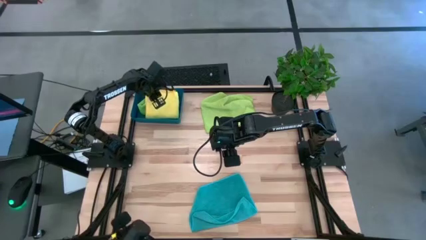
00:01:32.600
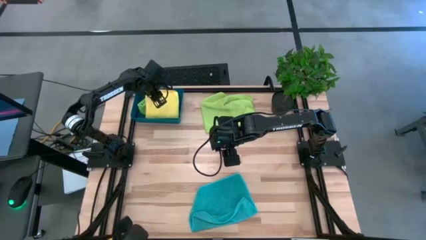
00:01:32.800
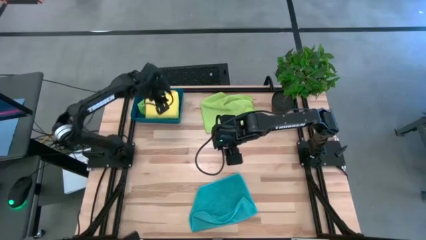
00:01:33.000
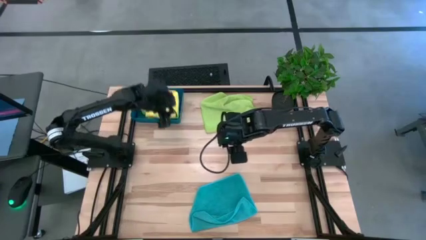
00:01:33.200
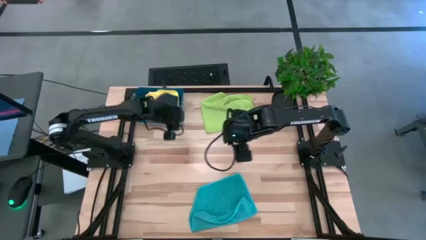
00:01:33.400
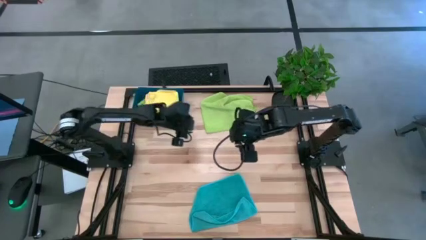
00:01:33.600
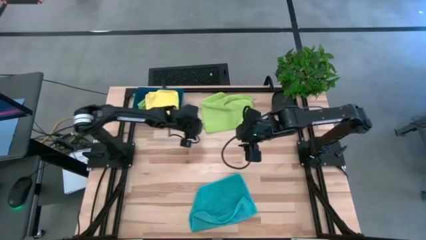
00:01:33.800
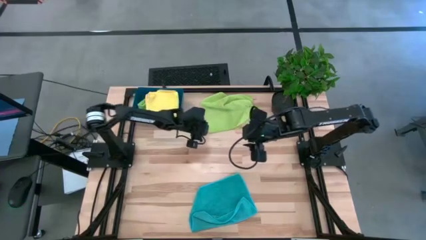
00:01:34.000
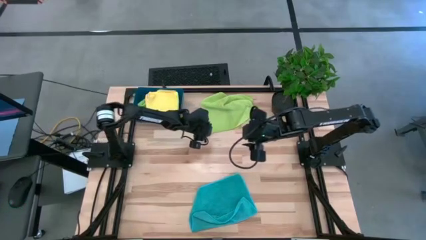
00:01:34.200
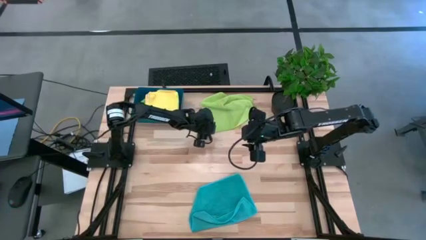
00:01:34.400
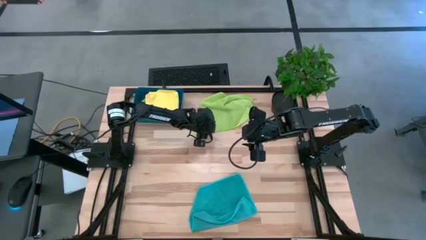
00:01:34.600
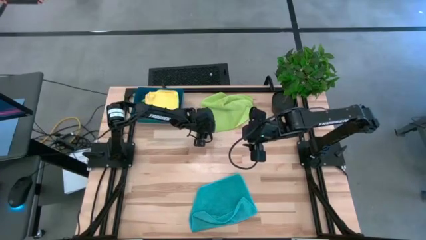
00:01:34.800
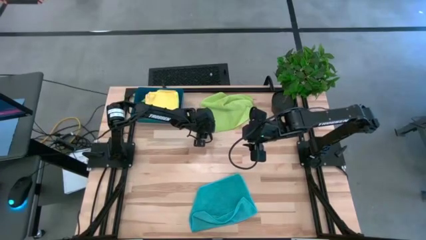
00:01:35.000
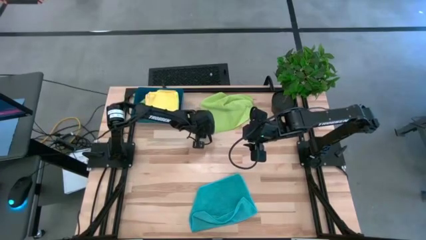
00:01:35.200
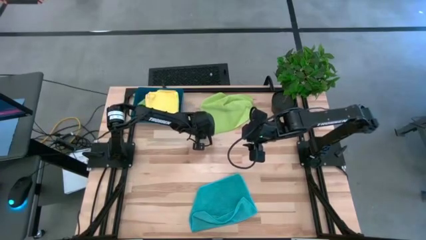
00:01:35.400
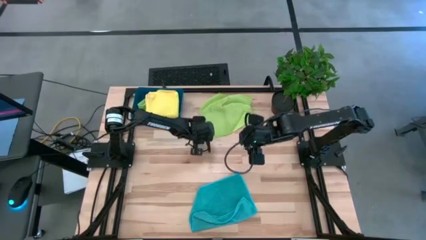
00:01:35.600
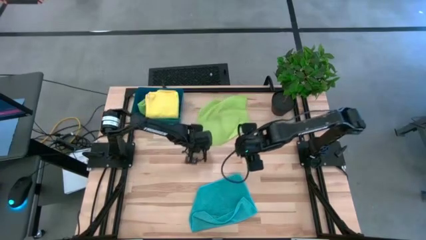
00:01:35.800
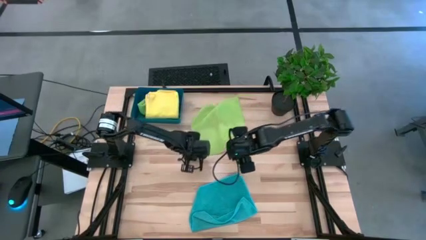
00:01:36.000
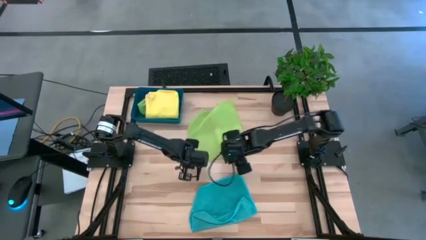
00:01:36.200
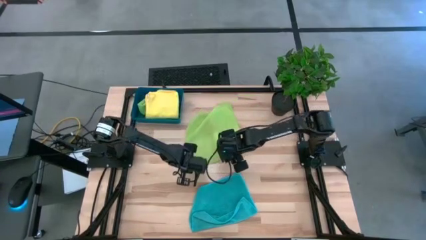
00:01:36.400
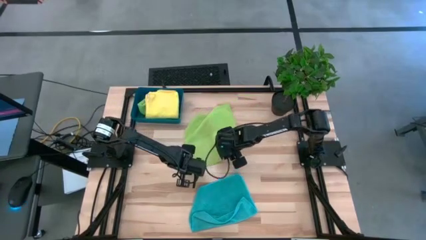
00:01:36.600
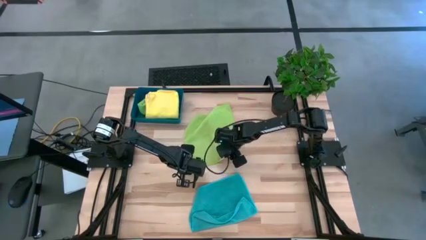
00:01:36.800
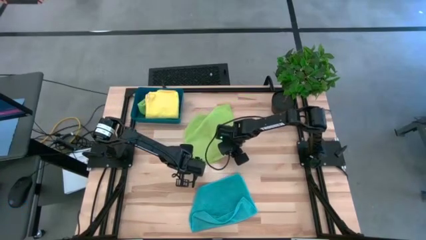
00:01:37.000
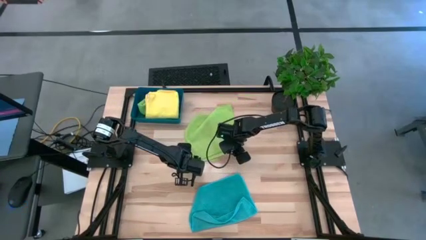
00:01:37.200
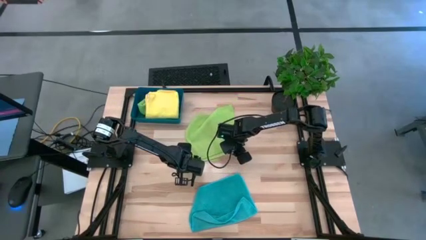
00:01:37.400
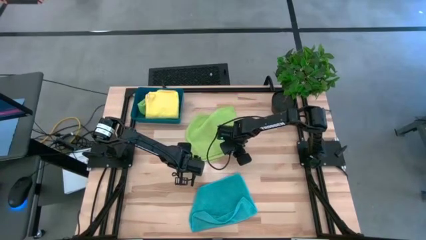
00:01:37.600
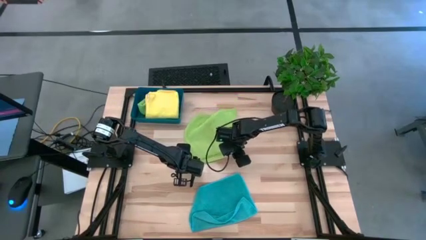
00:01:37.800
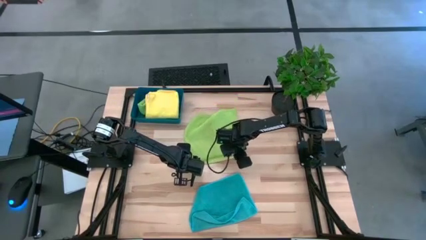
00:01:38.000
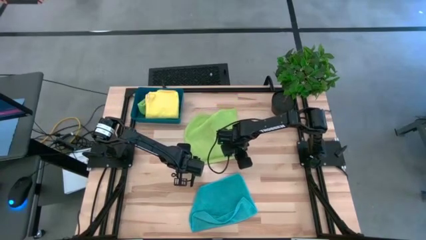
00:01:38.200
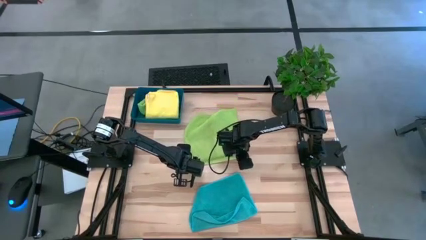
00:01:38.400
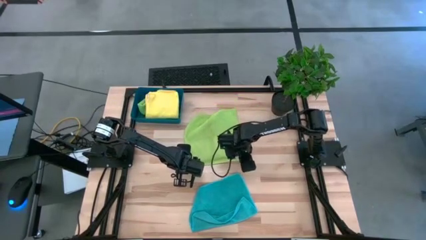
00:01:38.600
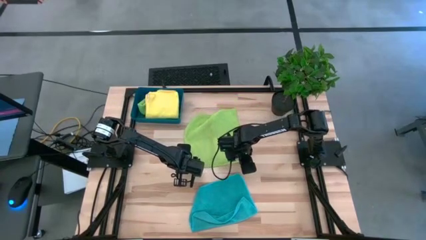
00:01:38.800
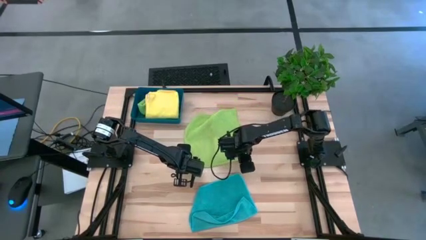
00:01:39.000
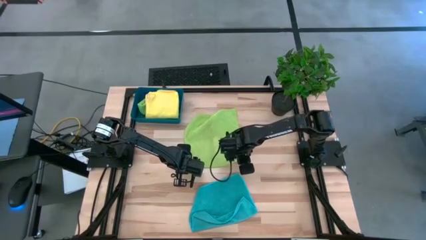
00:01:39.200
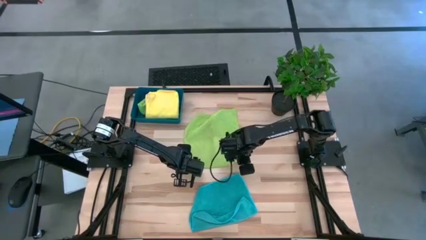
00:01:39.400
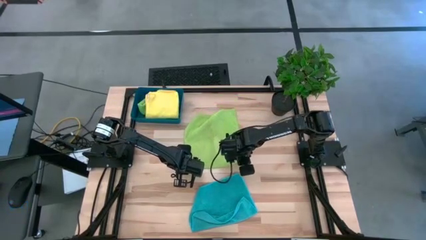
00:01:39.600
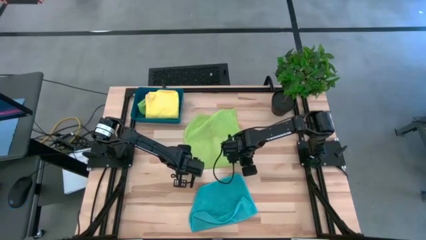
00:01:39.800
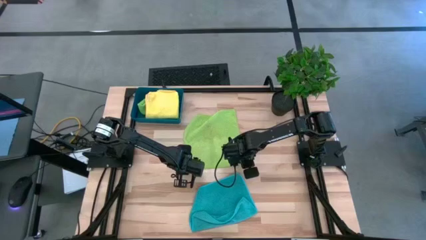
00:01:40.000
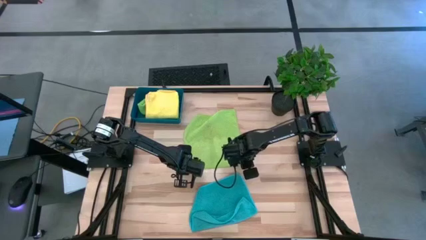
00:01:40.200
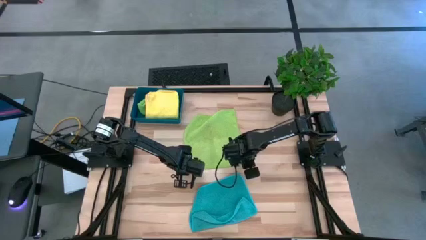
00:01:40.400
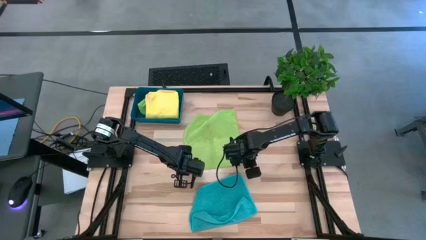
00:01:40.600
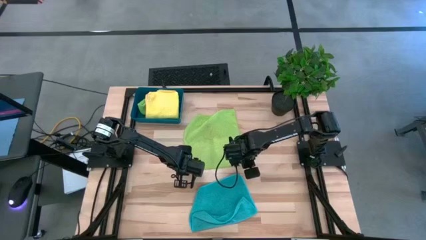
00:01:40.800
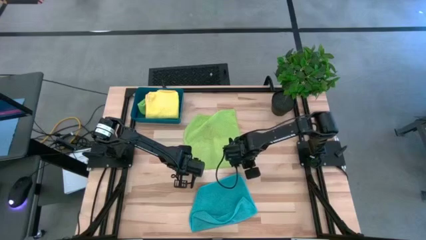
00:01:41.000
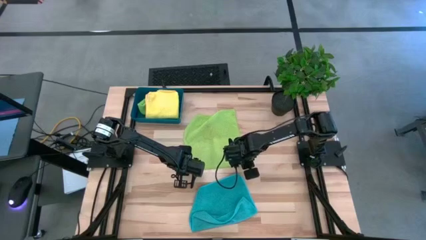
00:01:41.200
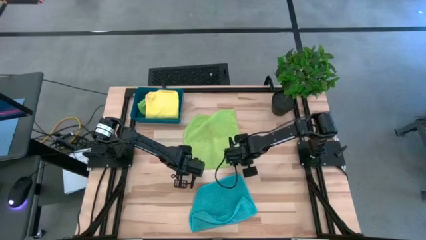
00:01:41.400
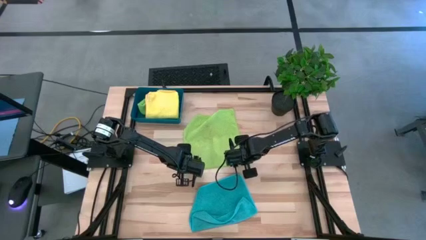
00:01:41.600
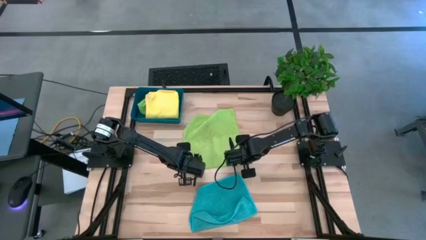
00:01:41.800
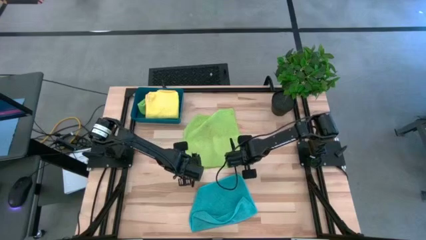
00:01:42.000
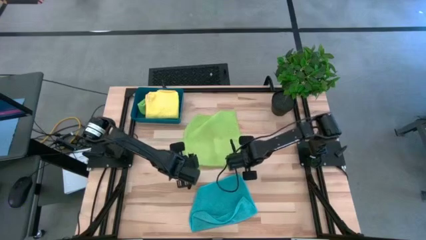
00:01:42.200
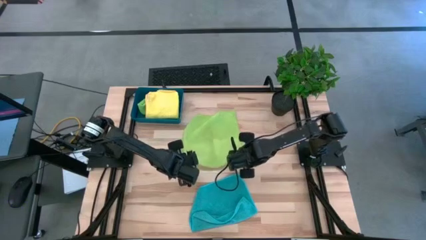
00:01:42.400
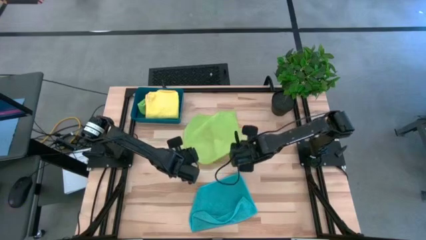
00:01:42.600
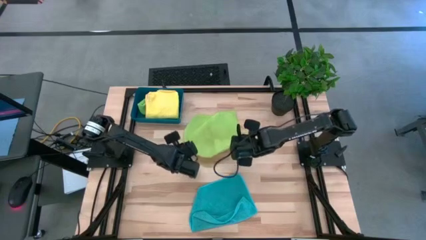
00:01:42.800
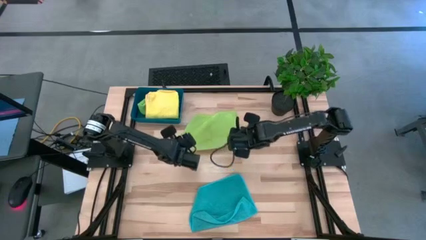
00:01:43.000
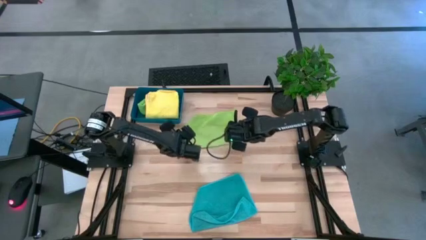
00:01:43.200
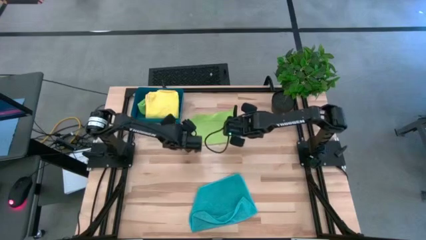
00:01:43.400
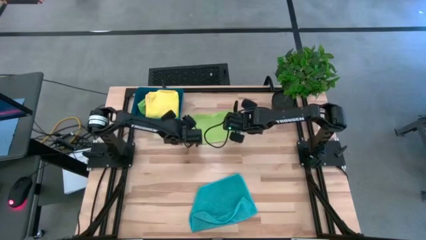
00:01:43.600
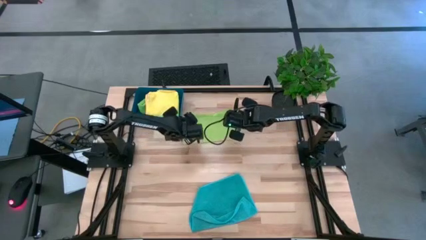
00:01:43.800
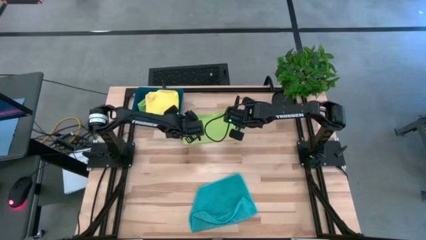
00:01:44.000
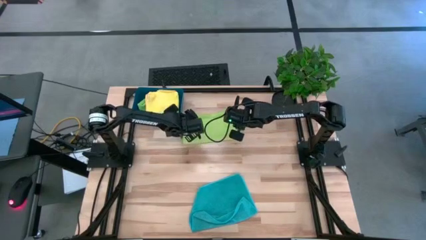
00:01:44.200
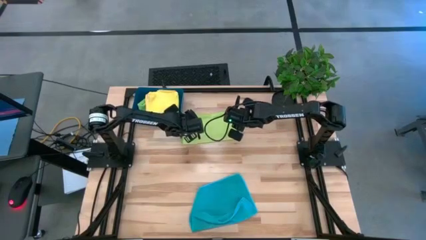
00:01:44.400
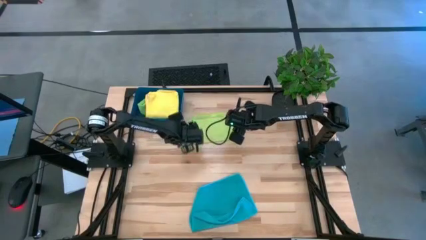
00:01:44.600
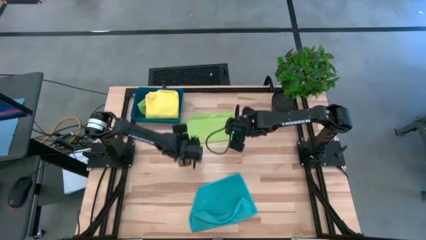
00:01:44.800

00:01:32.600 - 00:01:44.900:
Task: Fold microfiber towels
Fold the light green towel
